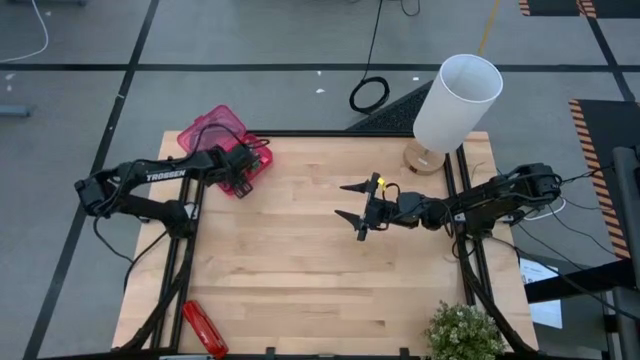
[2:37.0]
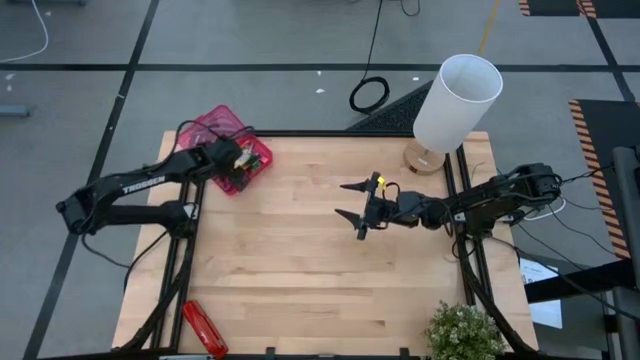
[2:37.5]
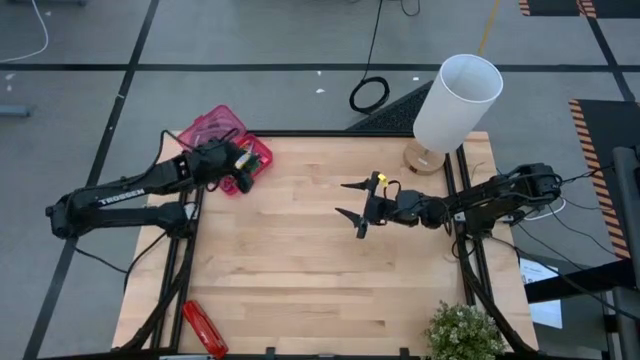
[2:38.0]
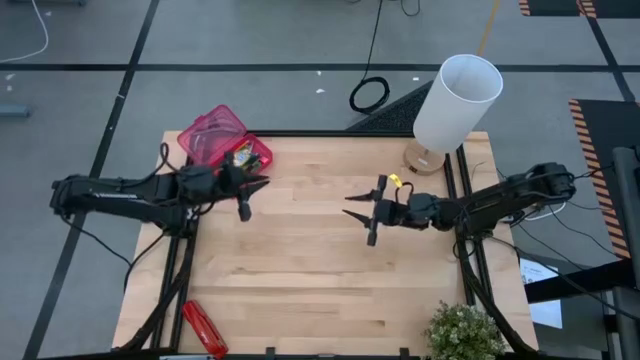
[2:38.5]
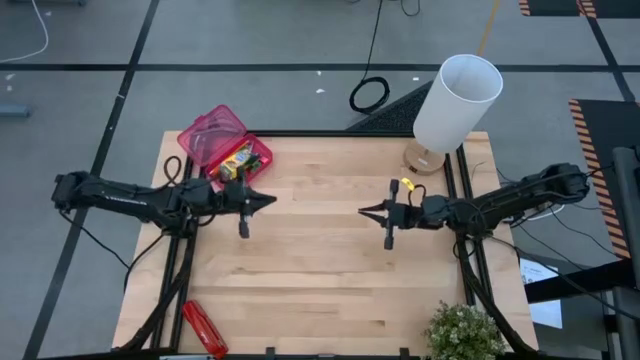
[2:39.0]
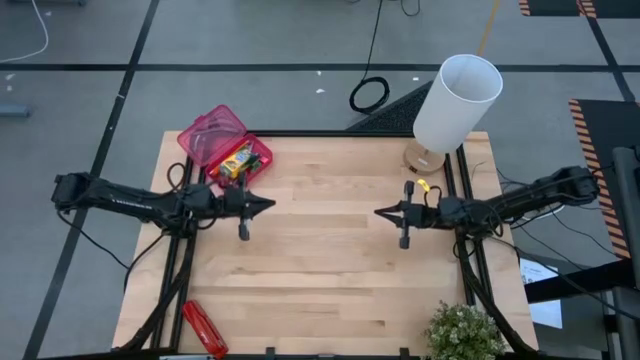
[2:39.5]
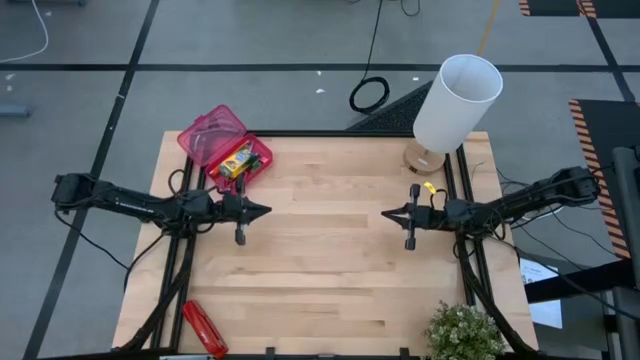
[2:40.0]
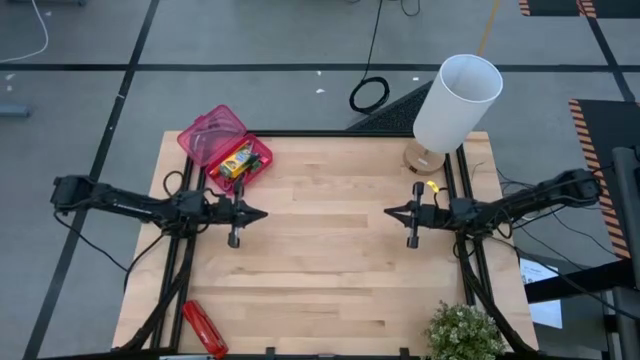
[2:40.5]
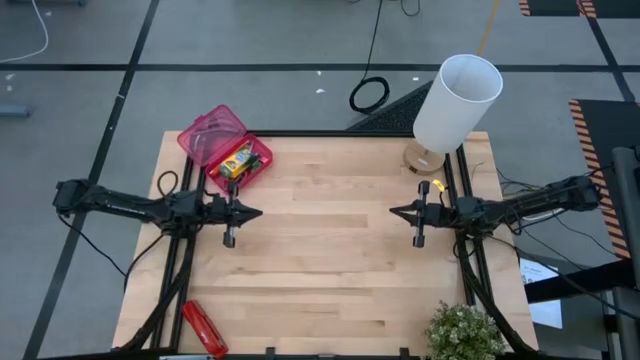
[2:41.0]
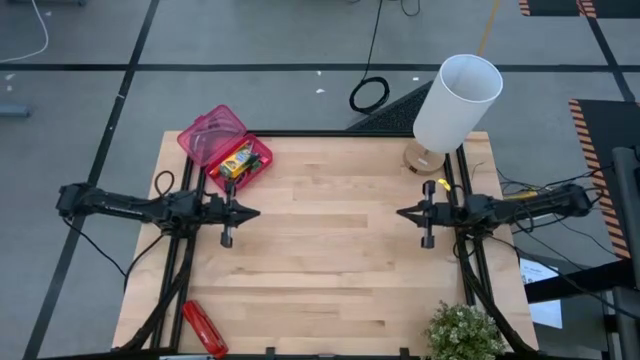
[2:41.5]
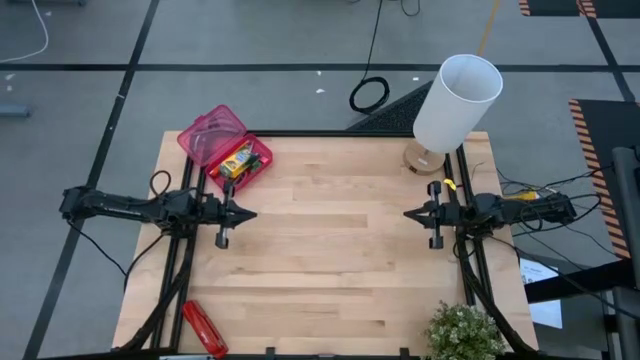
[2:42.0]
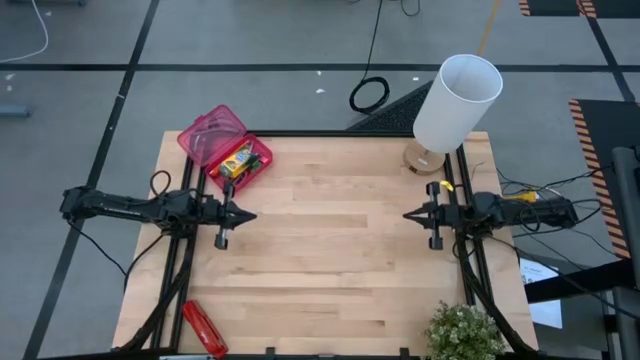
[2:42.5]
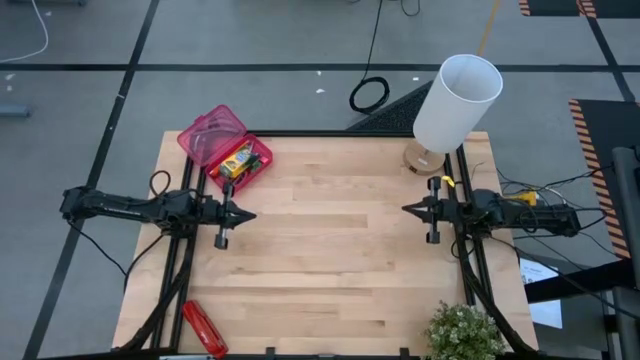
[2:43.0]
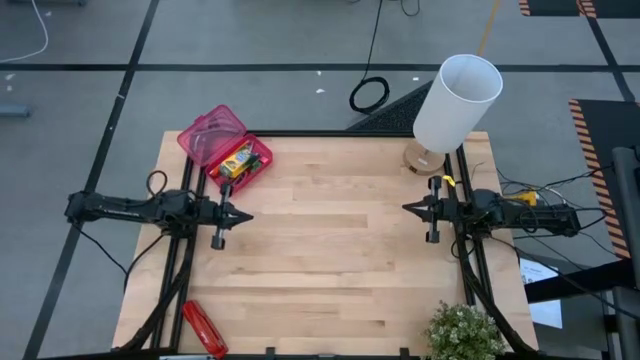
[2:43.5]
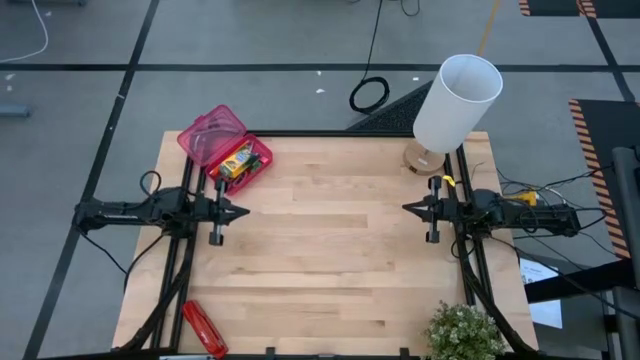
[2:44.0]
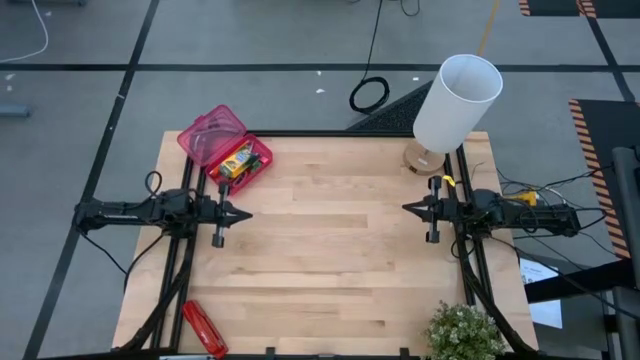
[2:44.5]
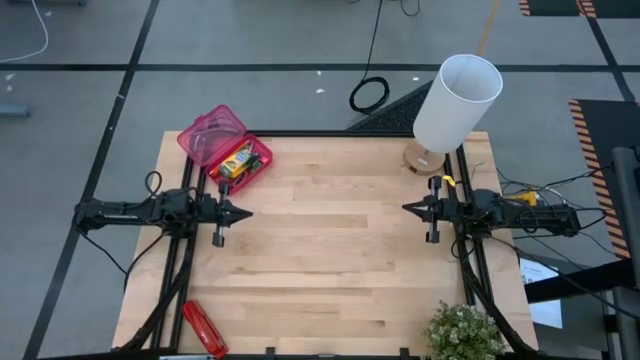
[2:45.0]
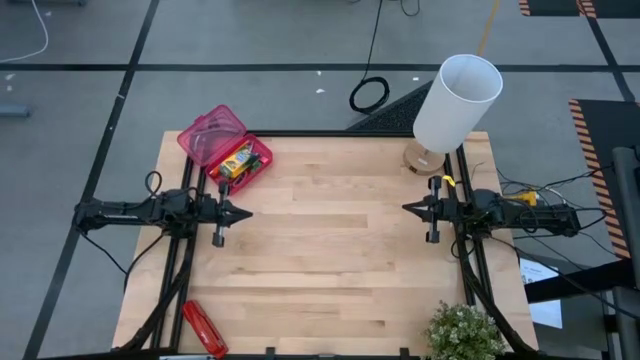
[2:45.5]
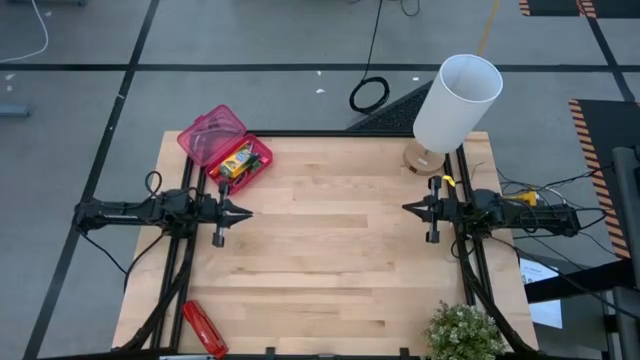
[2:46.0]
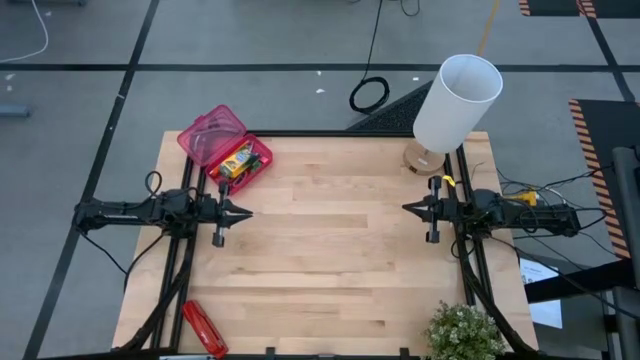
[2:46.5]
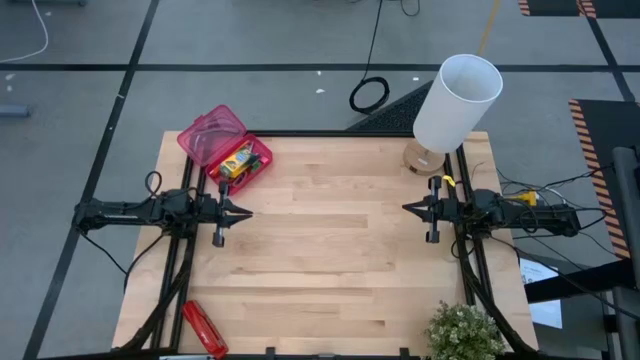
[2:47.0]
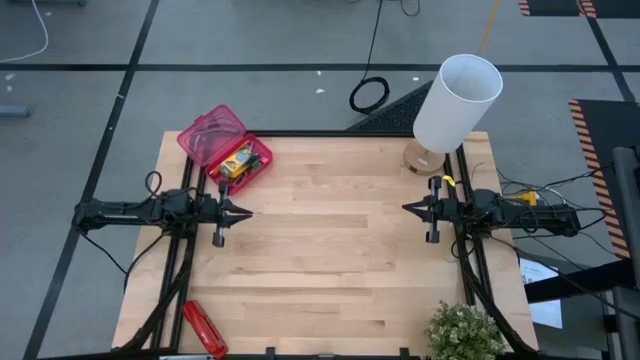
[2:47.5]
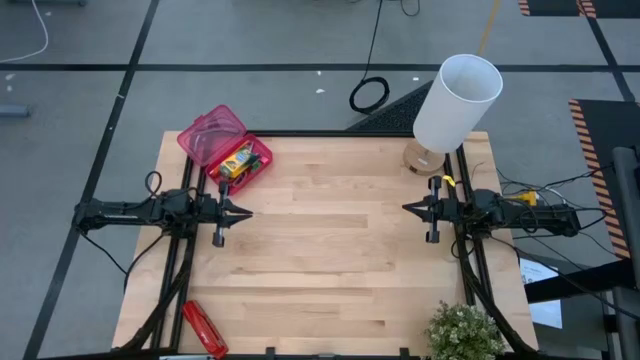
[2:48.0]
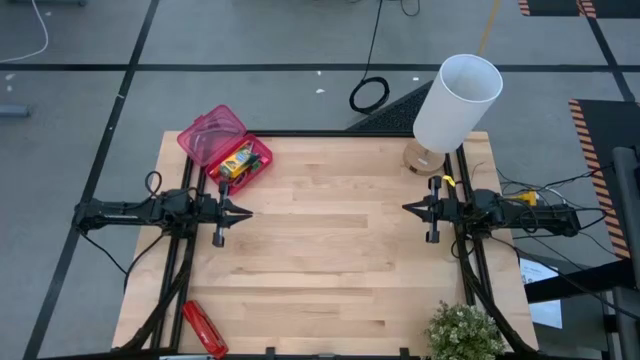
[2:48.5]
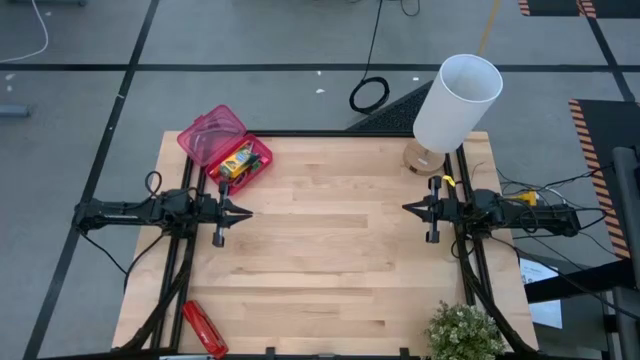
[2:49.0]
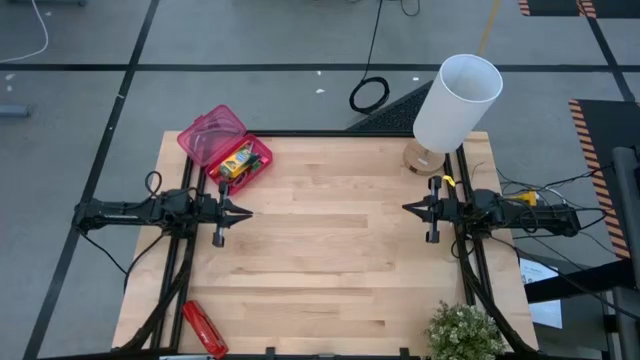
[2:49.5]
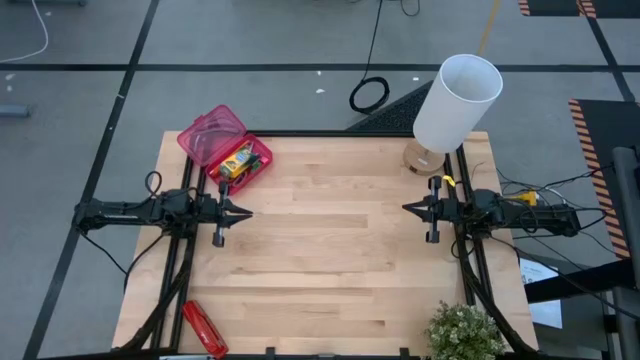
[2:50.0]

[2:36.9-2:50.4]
Task: Pack school essentials
Return to Home Position

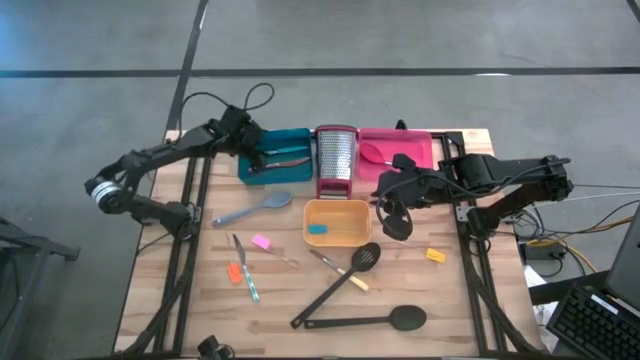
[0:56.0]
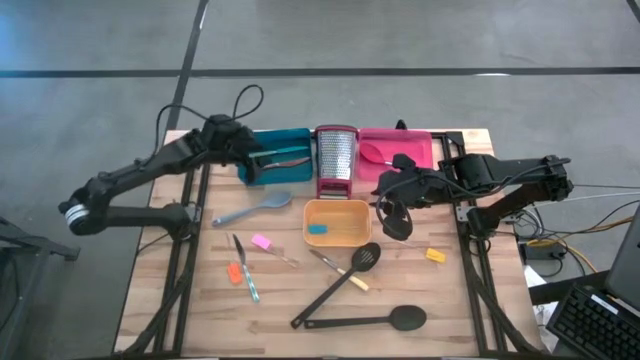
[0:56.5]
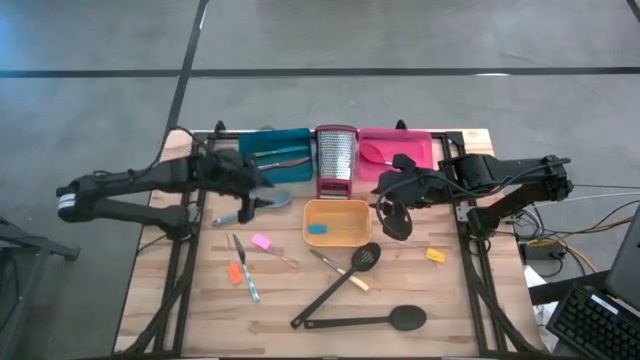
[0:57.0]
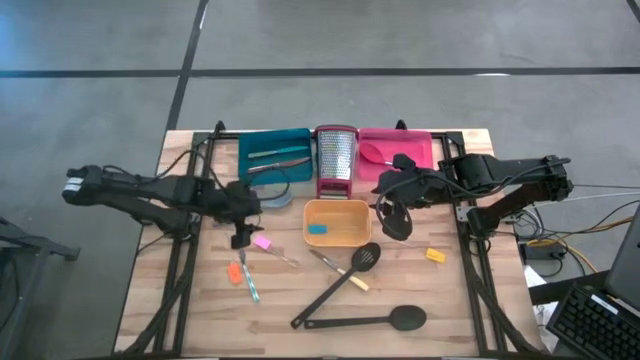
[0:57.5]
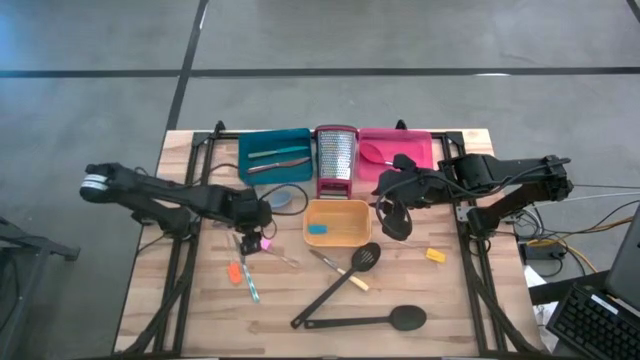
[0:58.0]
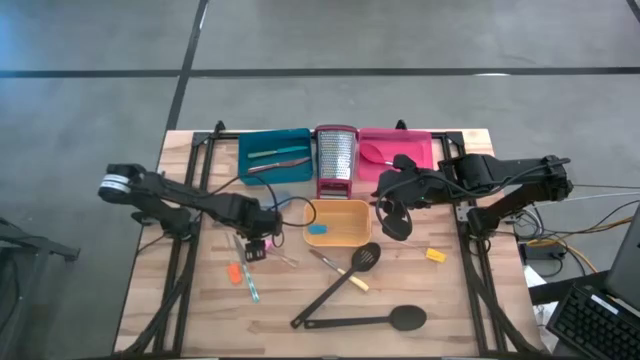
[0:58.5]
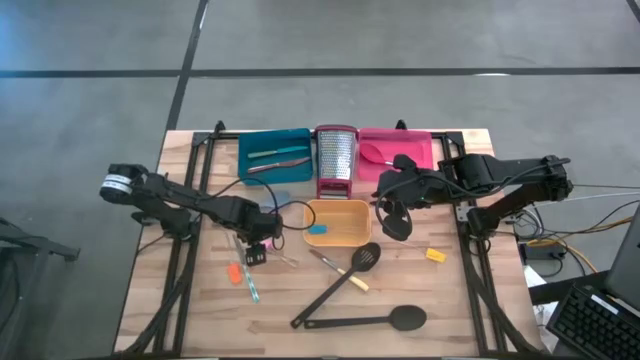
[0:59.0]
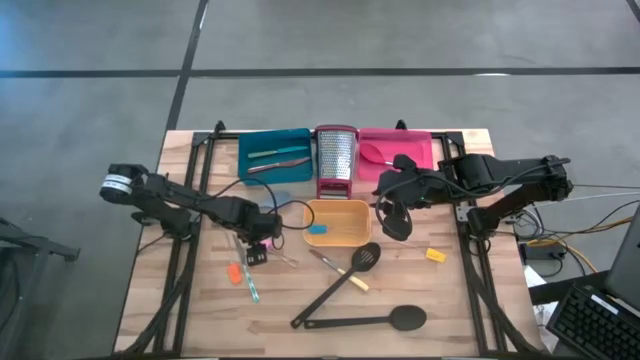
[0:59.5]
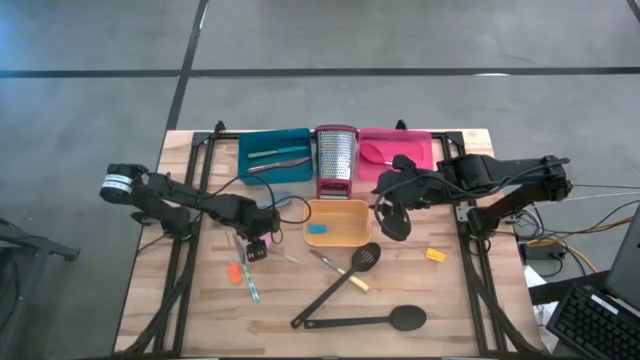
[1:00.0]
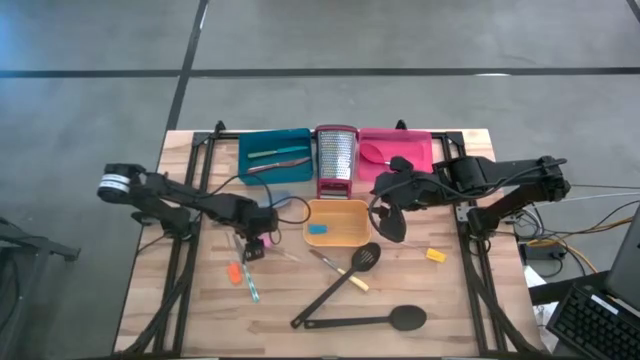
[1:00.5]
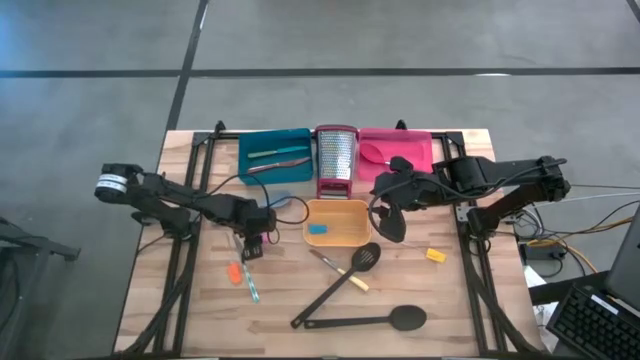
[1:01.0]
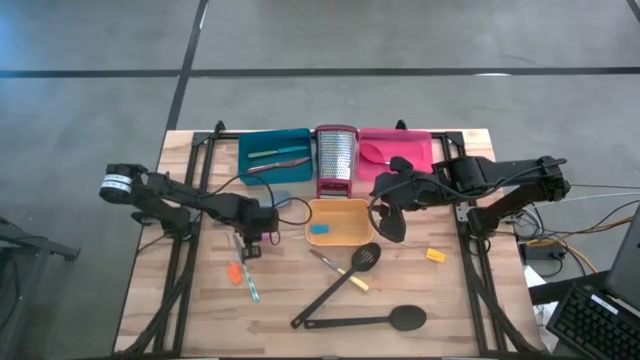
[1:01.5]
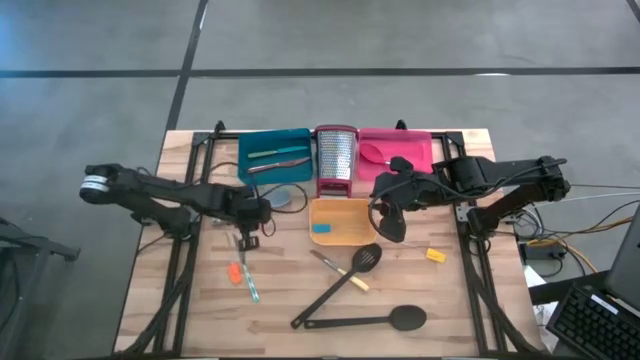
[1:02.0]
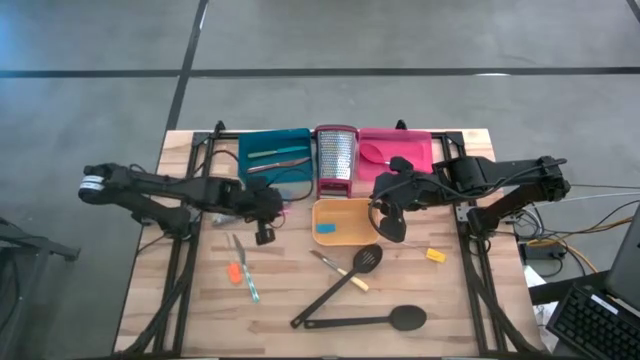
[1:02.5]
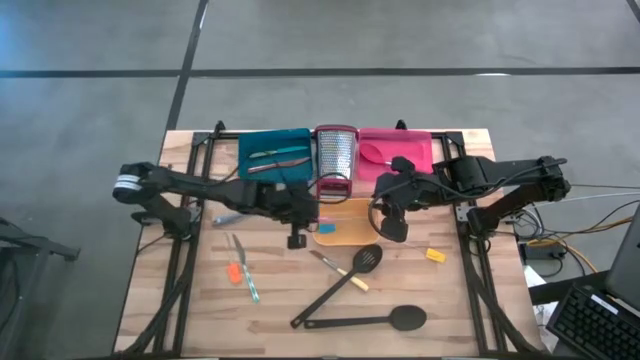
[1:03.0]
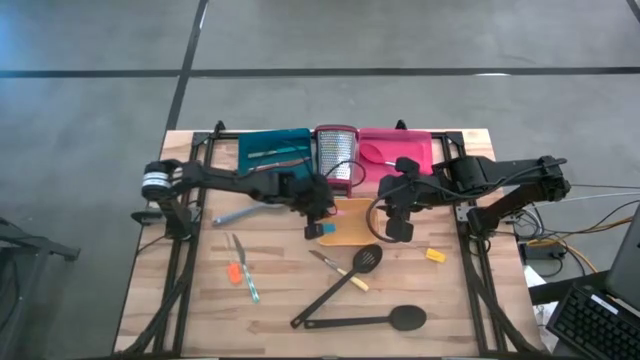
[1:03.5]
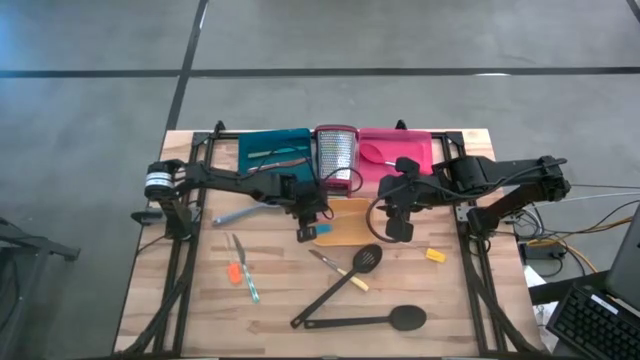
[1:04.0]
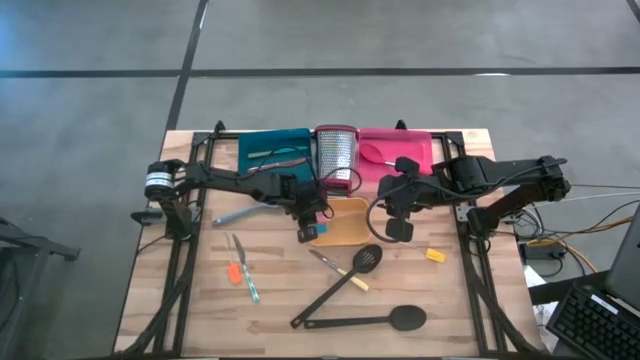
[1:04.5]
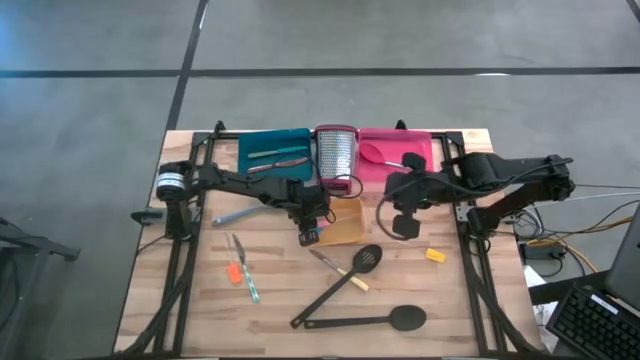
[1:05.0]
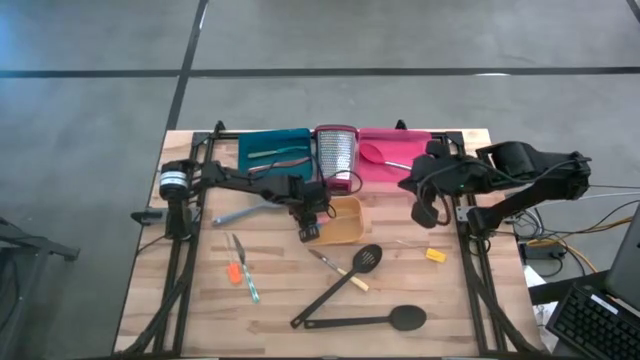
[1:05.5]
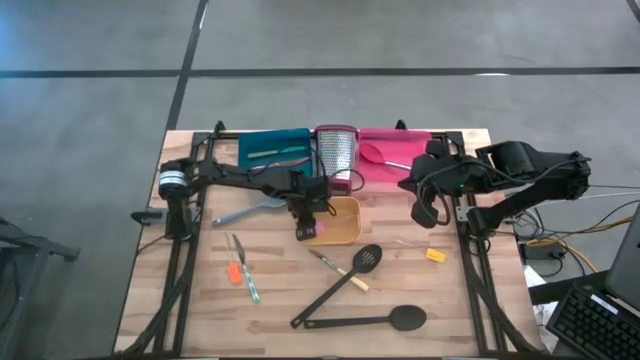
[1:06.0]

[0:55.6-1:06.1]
Task: Pick & Place Kitchen Items
Put the pink spatula into the yellow bin
